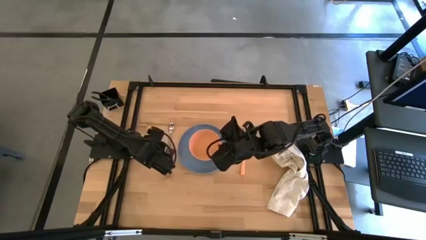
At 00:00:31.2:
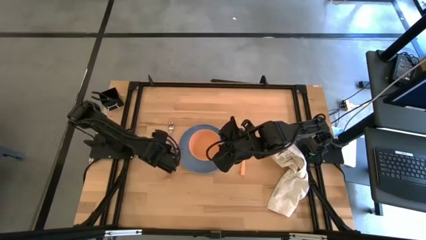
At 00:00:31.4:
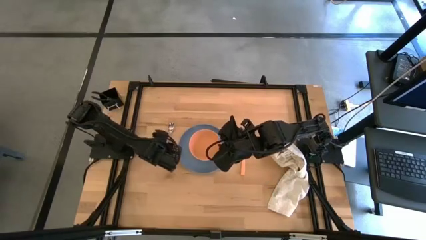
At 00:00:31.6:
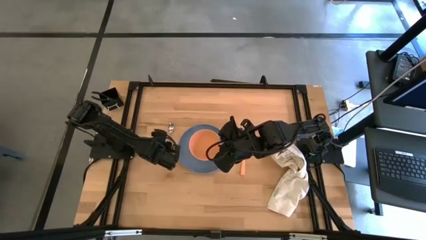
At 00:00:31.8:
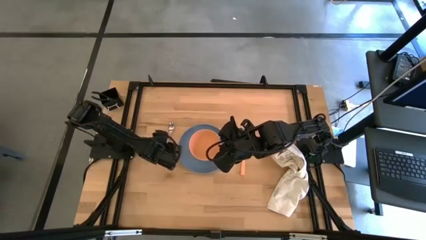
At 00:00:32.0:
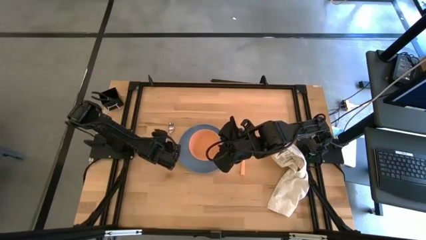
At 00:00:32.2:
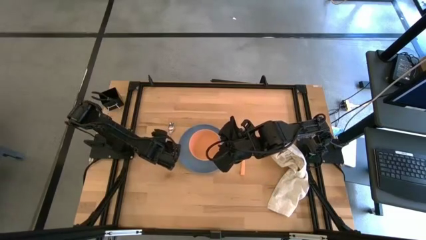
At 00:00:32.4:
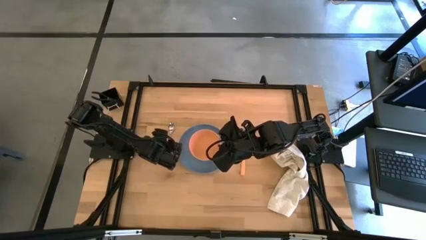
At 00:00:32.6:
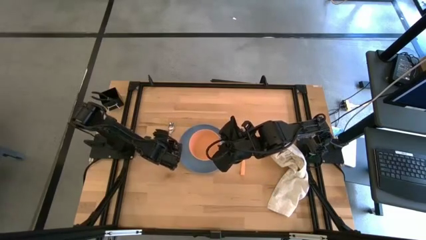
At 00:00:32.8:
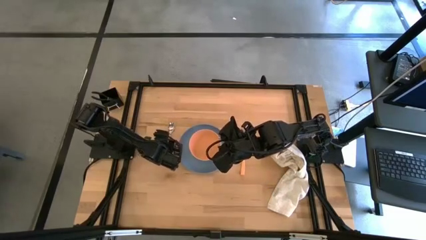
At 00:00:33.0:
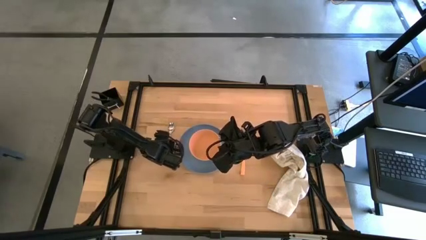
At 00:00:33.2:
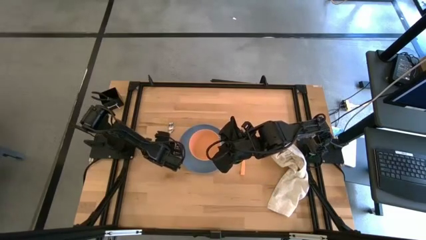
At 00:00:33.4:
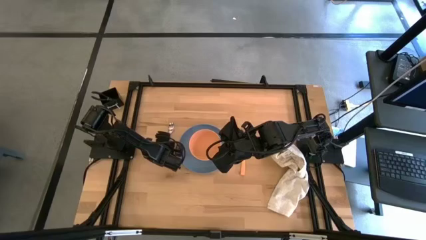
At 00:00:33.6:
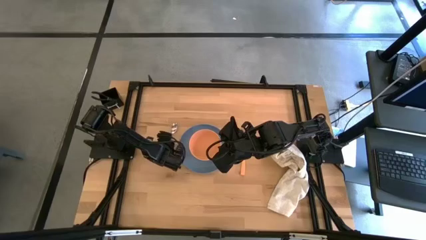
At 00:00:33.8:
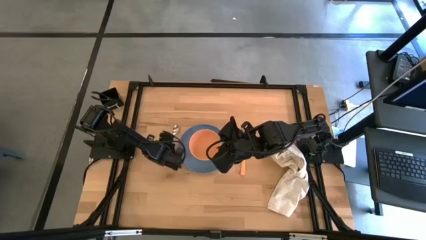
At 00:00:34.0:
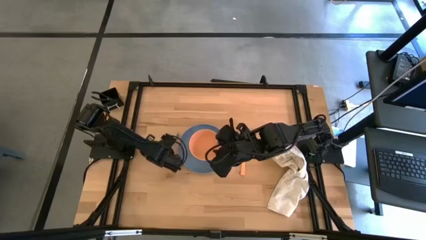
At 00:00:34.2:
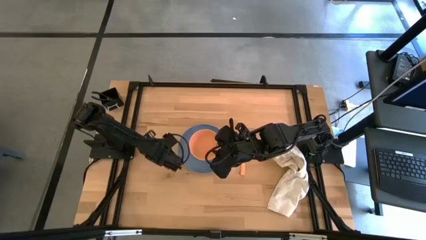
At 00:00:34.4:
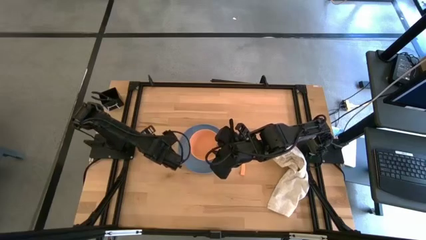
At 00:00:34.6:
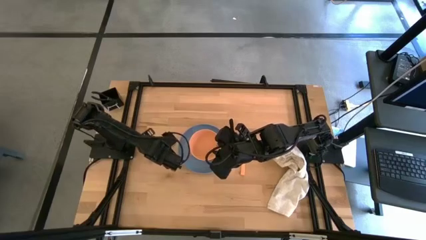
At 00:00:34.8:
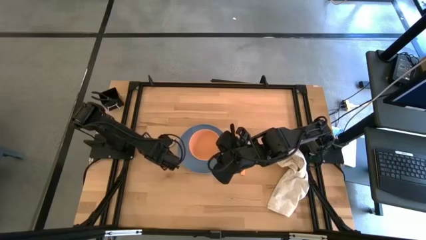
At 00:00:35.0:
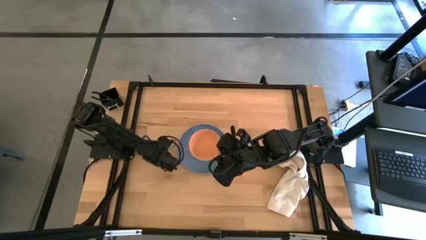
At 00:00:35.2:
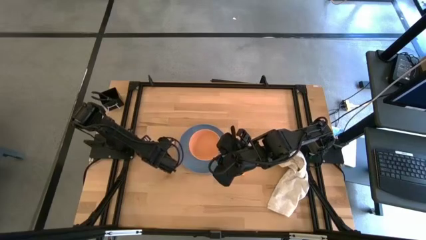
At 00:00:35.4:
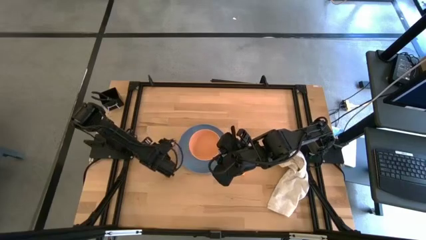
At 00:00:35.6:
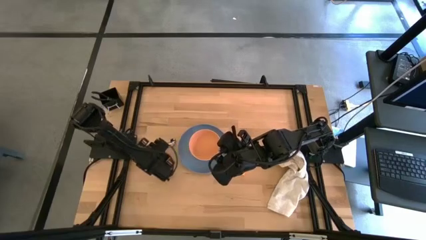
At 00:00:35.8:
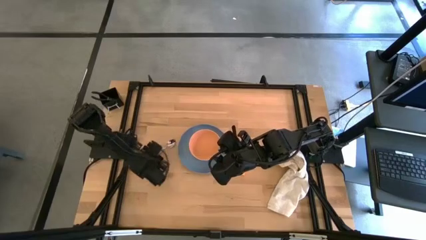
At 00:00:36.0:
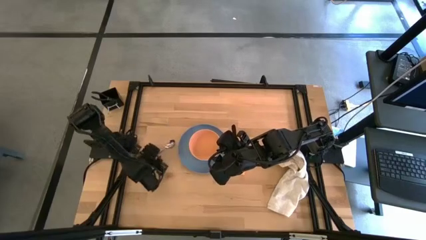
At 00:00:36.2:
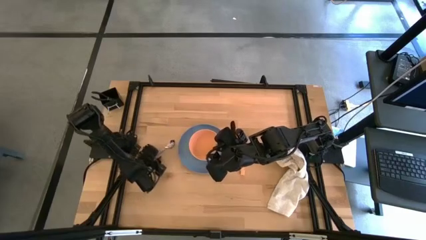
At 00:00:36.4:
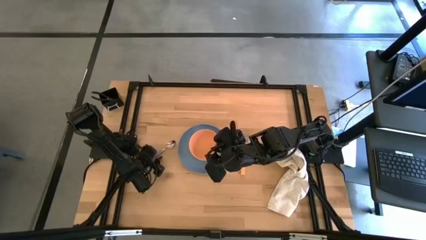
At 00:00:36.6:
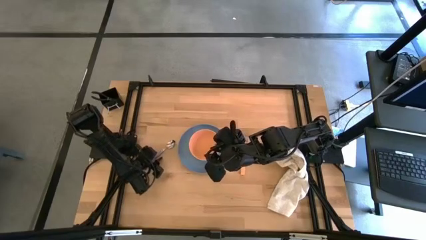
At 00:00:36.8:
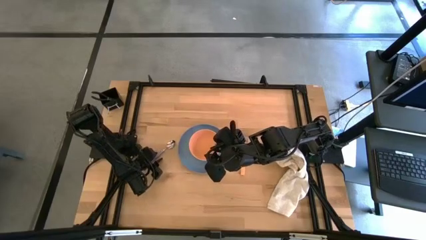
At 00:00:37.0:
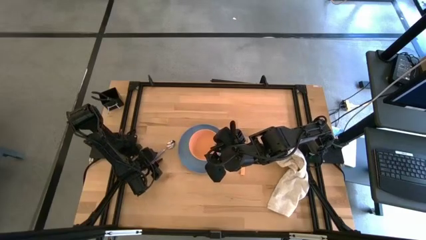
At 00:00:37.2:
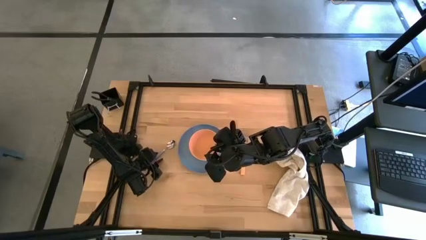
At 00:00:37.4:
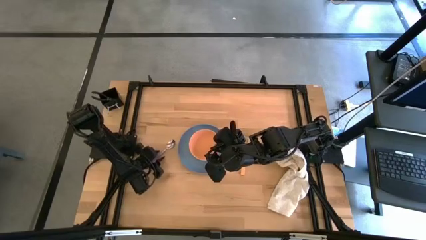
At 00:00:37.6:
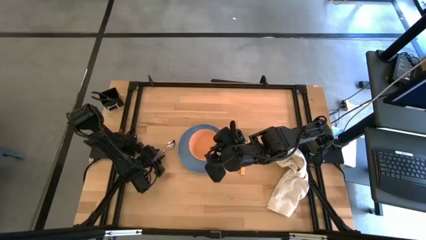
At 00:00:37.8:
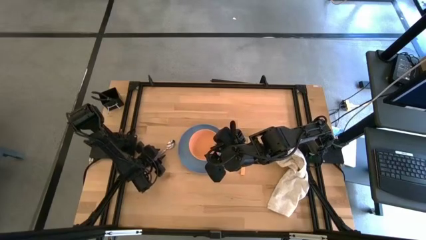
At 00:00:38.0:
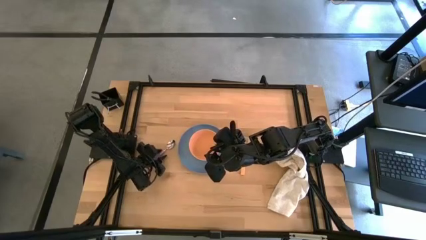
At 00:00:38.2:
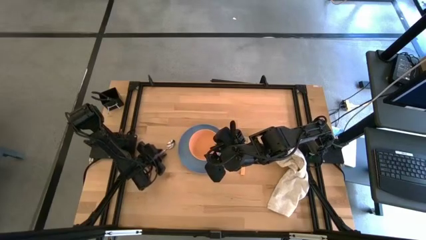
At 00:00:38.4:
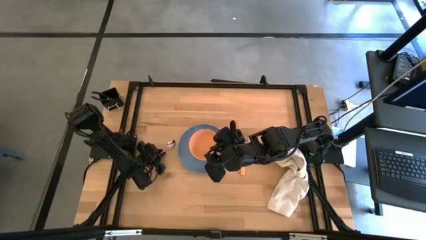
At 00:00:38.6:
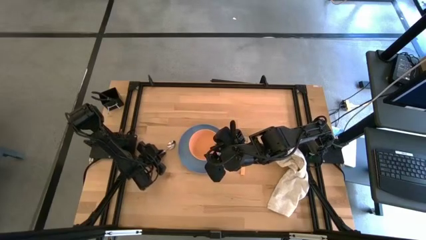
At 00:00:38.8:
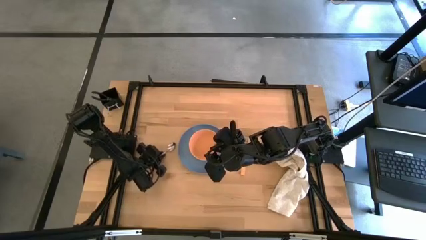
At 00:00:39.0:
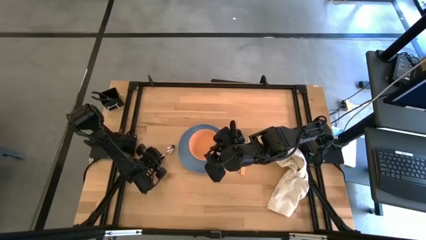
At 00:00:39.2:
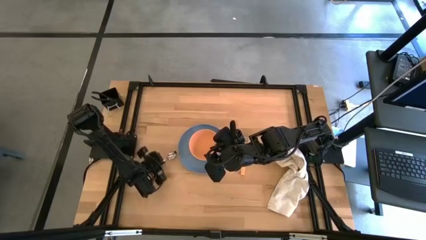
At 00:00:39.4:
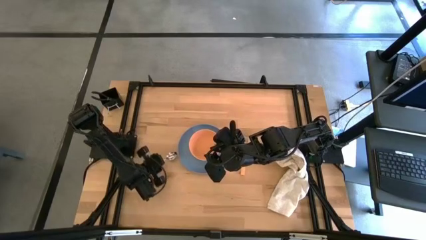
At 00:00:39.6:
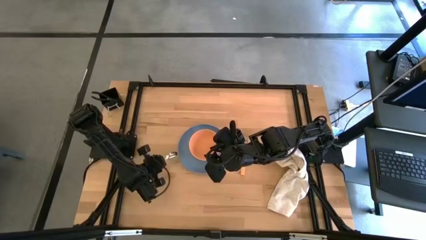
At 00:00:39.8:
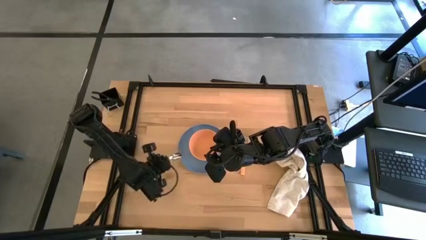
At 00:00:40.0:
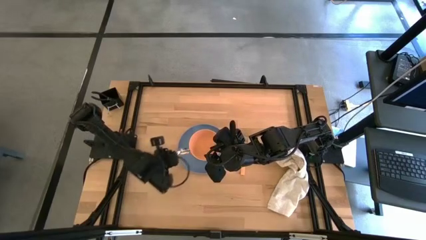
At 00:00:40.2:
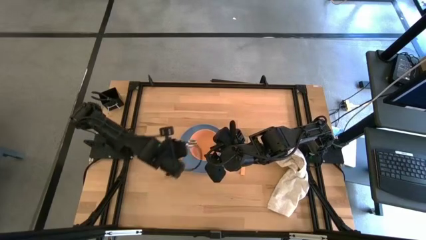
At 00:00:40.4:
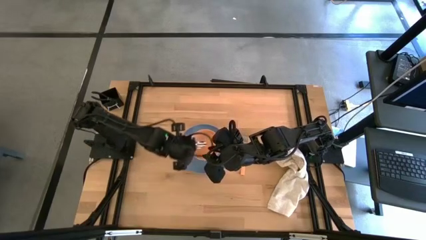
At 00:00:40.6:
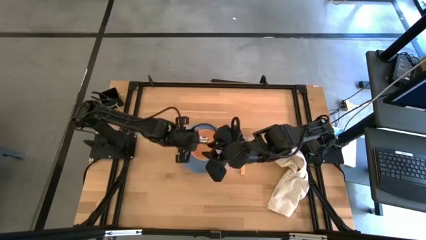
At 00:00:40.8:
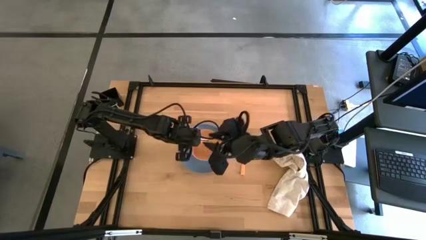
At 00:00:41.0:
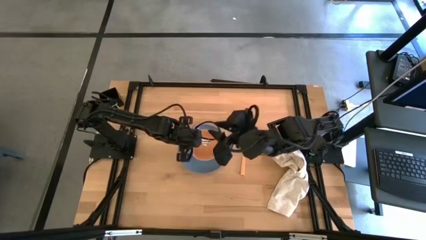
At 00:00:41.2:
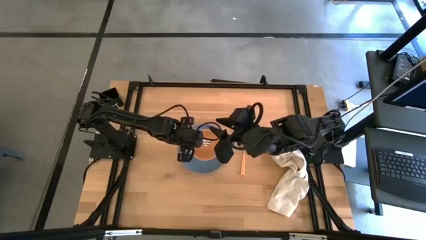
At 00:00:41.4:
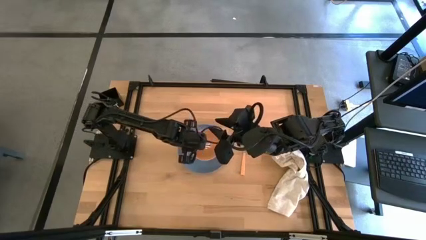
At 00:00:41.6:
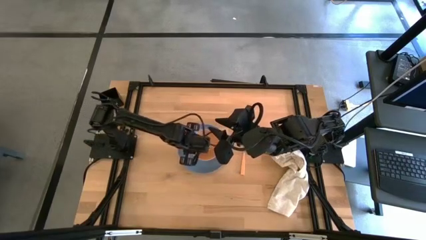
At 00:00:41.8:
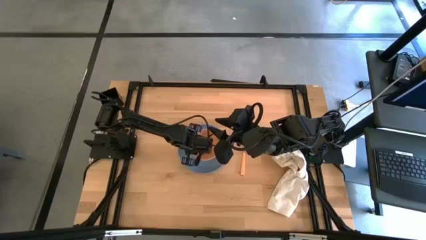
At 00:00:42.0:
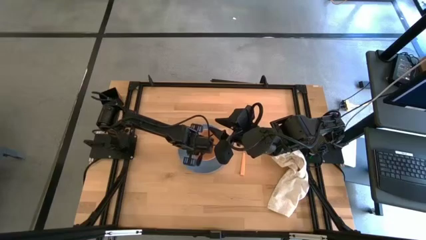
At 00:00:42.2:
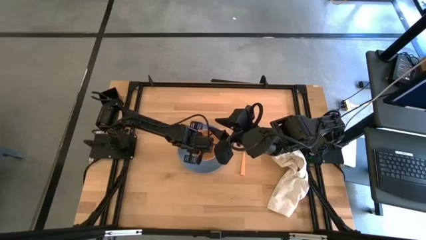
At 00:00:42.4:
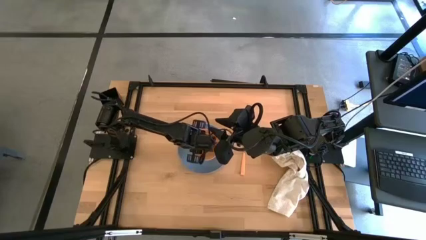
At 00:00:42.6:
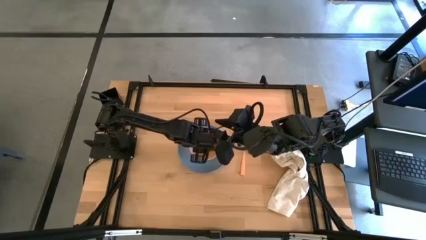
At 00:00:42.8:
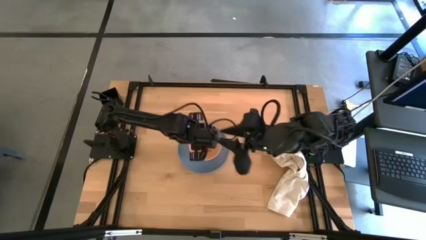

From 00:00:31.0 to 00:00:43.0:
Task: Set table place
Place the fork next to the blue plate
